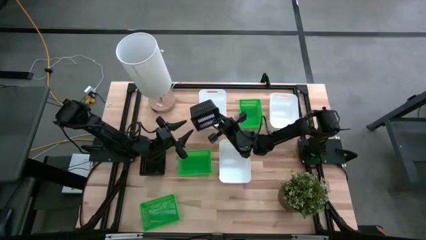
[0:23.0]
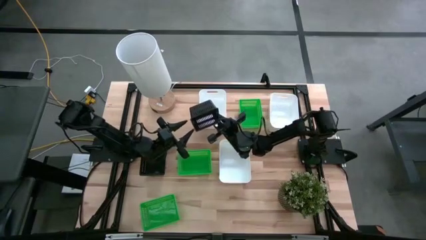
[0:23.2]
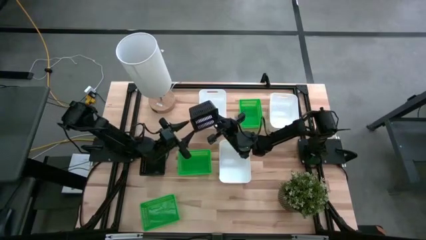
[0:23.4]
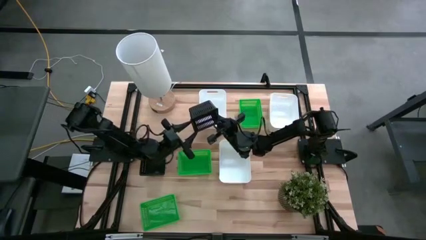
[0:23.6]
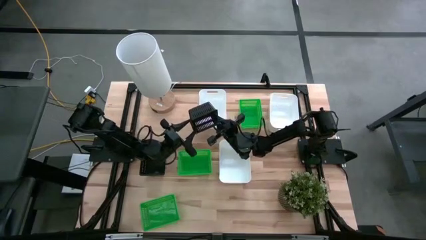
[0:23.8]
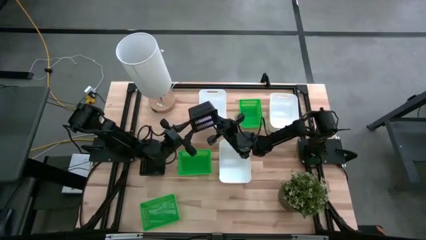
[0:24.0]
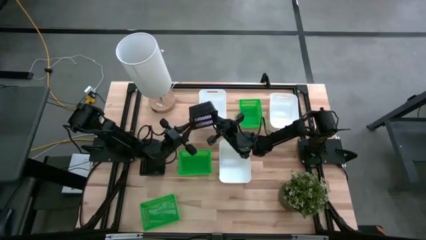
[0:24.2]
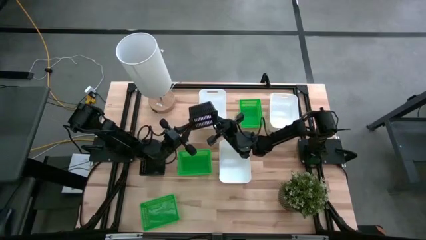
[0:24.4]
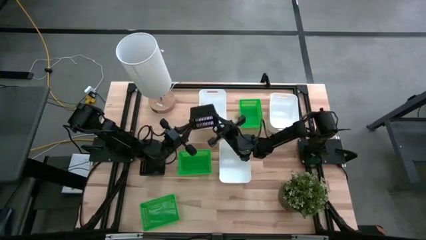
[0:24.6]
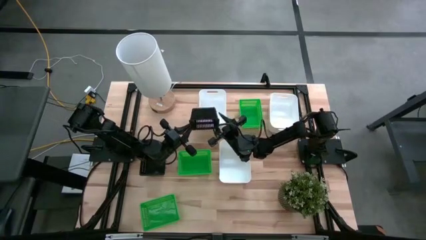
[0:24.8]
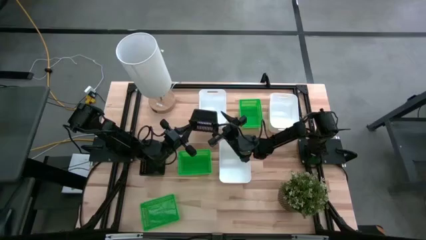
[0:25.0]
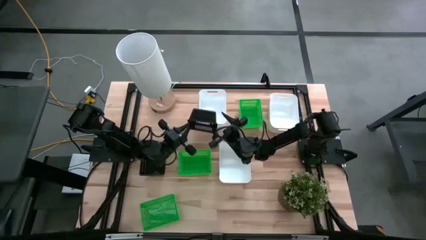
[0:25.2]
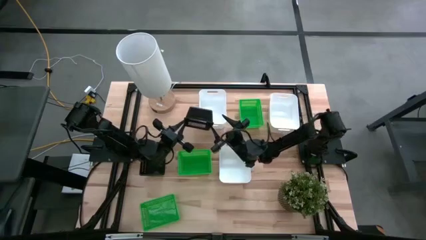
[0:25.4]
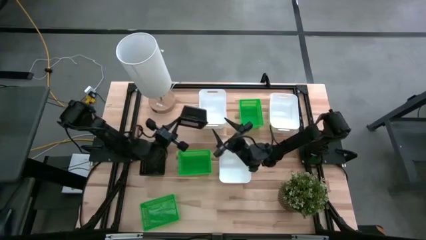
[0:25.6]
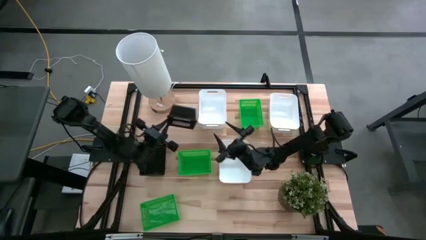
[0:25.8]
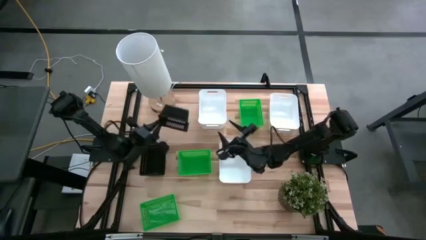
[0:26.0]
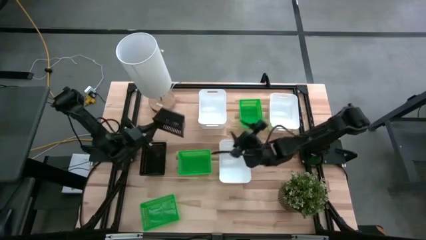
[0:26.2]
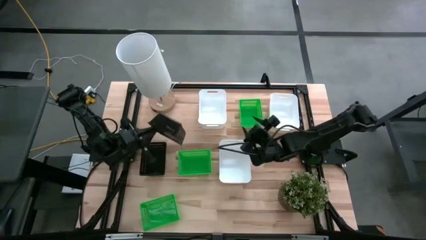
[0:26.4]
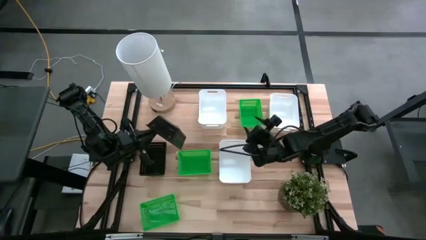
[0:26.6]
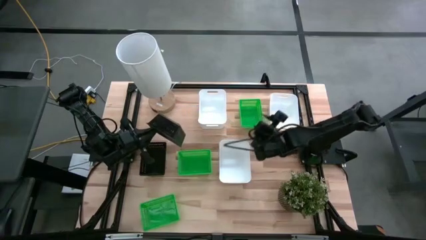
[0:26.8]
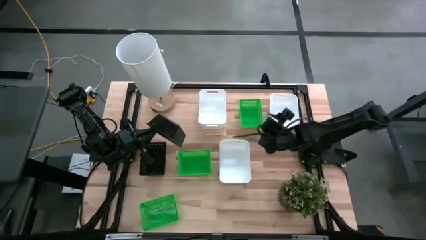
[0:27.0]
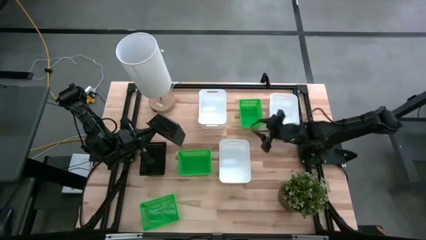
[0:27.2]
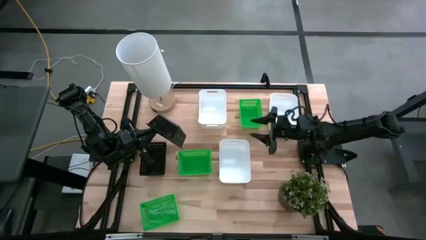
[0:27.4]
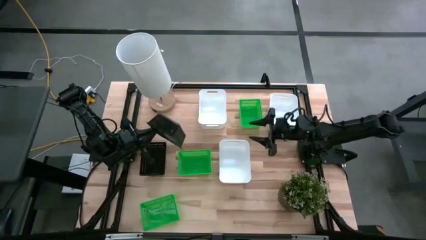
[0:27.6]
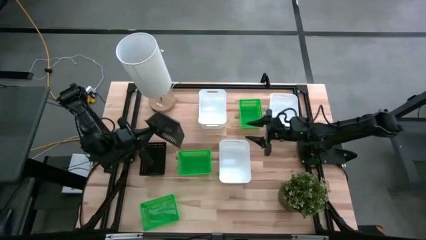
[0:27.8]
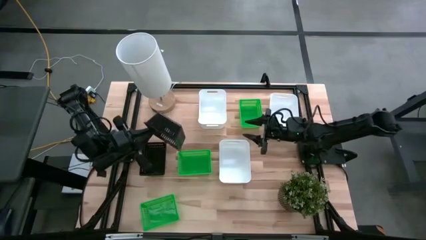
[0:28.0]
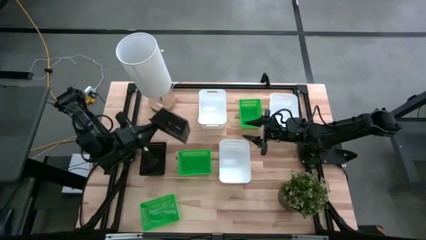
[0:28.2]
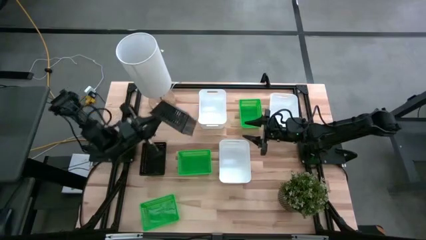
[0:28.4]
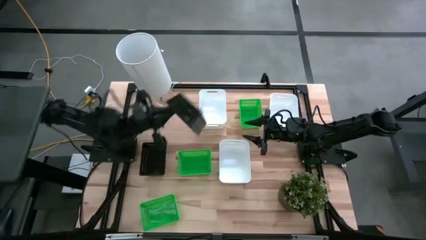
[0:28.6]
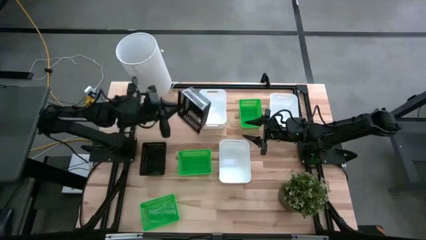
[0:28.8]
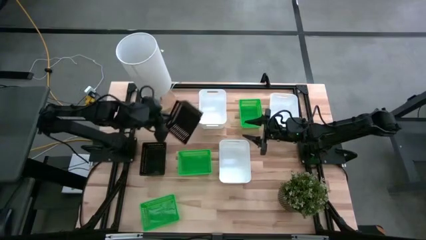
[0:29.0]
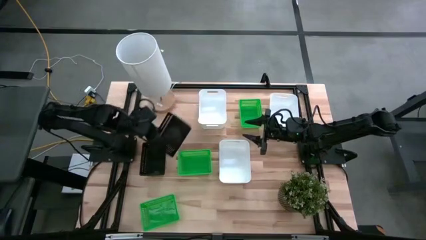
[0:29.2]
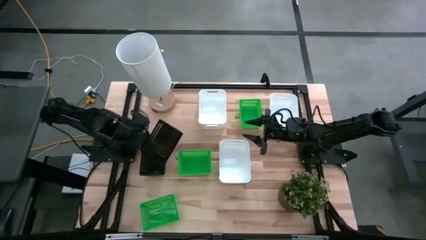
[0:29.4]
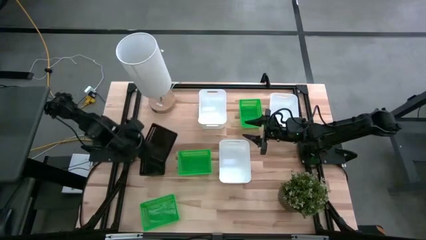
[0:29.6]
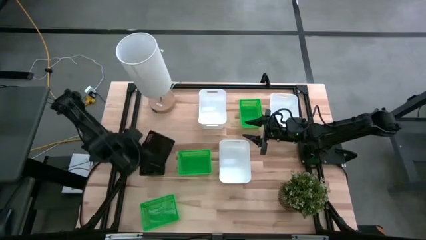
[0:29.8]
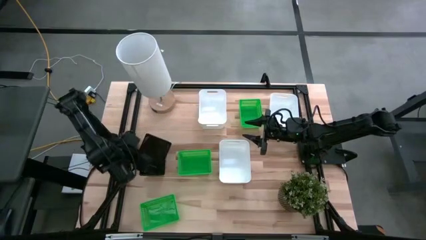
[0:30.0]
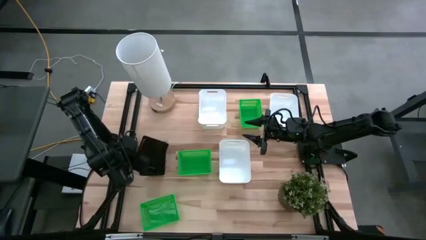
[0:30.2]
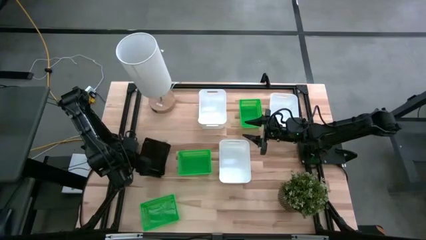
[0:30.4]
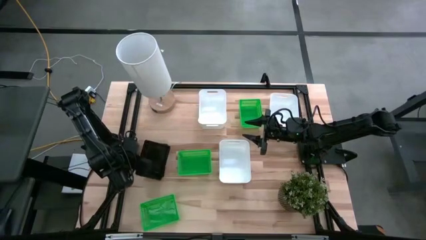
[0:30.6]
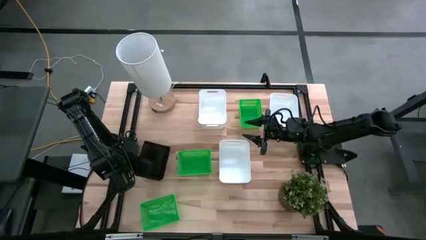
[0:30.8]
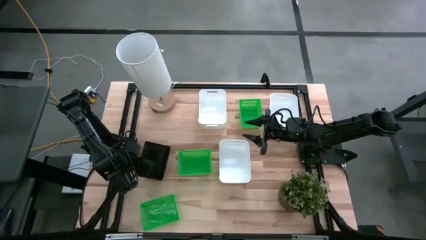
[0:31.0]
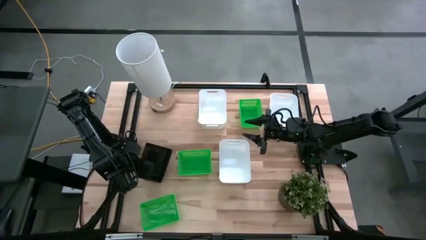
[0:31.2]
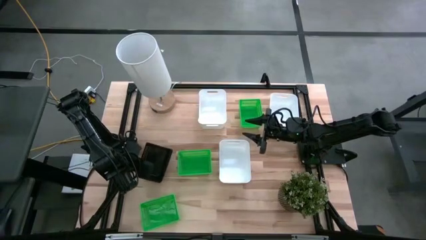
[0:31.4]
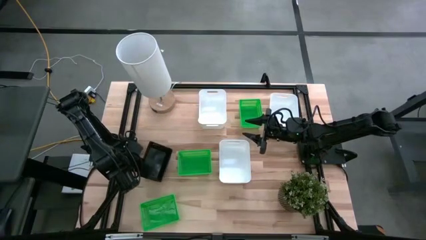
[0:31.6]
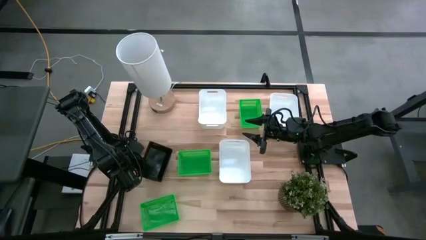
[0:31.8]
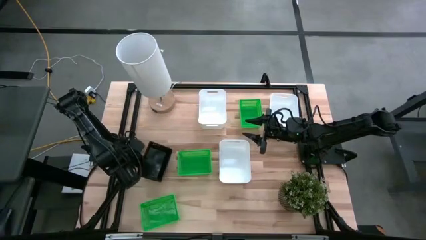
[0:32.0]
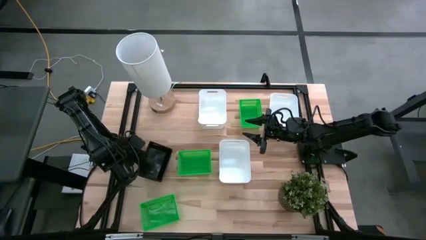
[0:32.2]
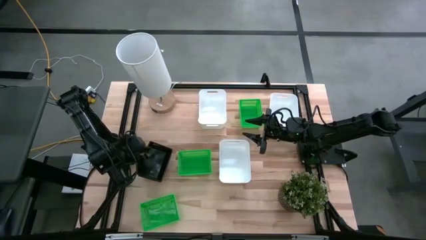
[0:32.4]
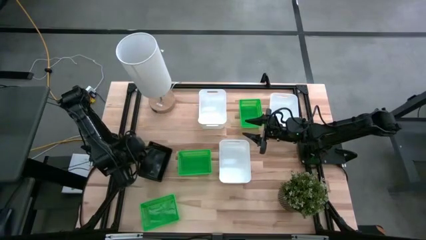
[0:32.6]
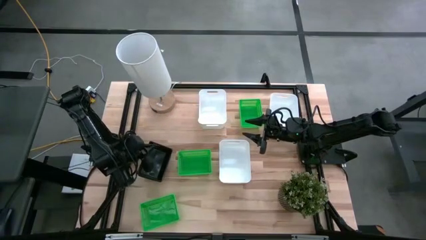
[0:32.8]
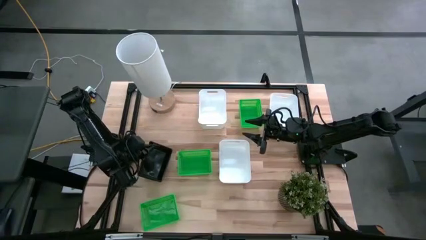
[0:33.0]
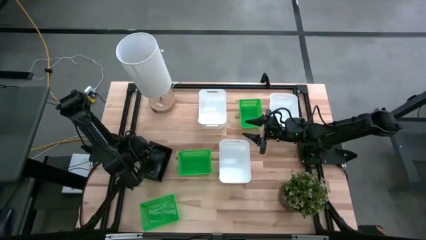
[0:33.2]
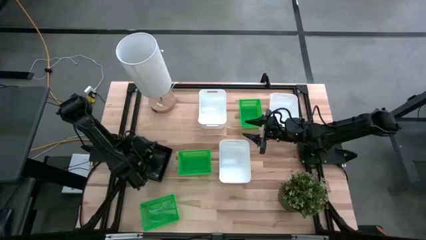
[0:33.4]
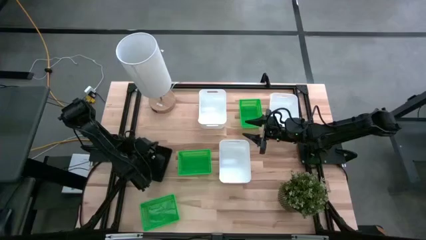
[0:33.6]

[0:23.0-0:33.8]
Stack the right black bin into the left stacked black bins

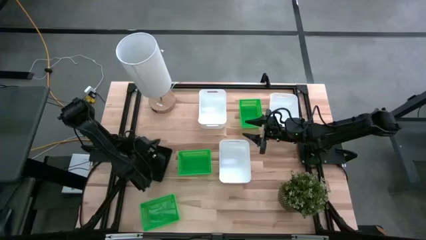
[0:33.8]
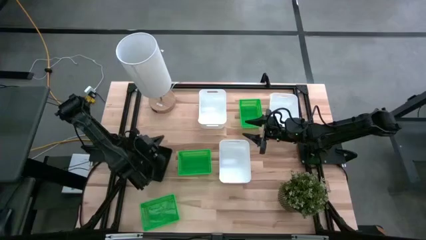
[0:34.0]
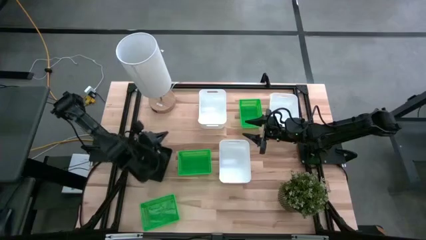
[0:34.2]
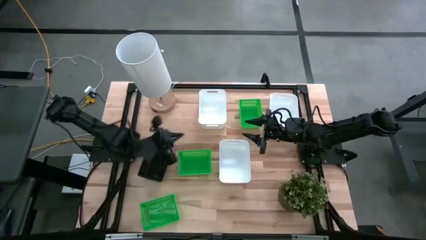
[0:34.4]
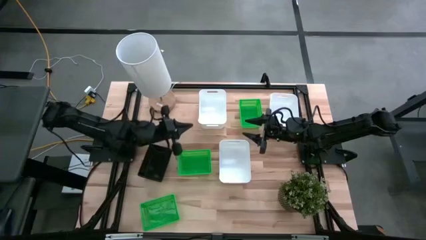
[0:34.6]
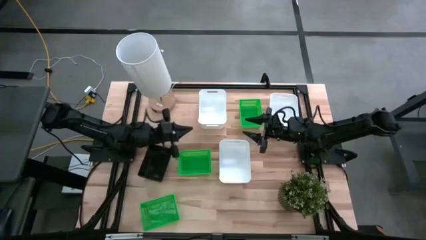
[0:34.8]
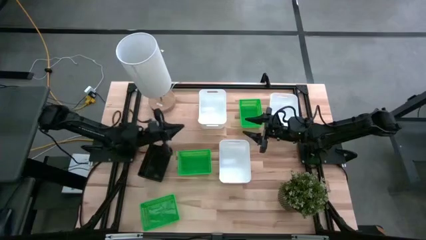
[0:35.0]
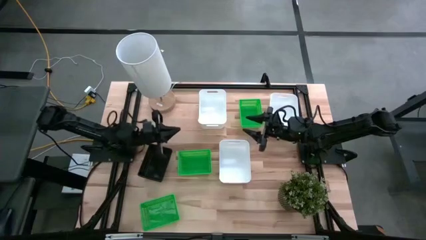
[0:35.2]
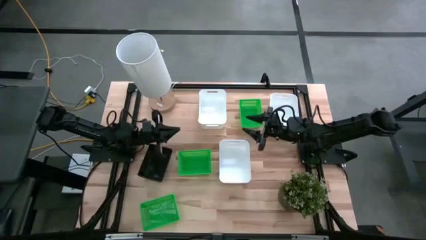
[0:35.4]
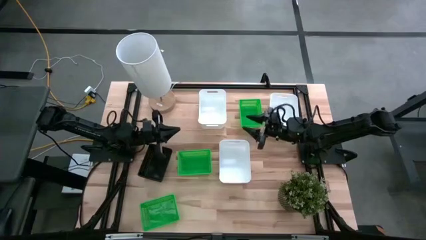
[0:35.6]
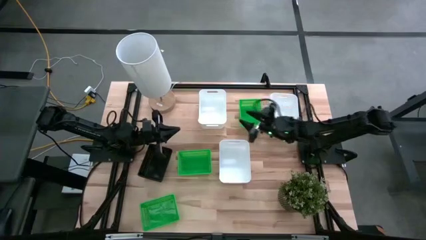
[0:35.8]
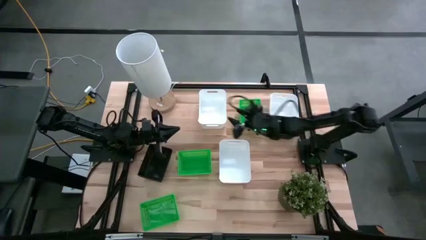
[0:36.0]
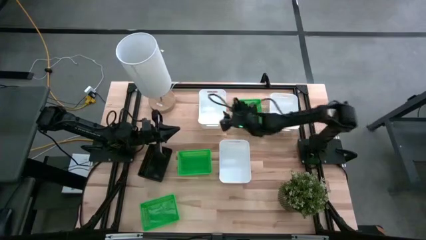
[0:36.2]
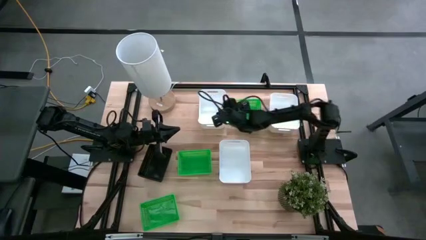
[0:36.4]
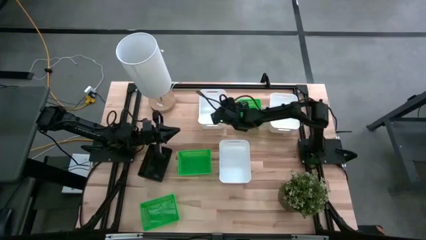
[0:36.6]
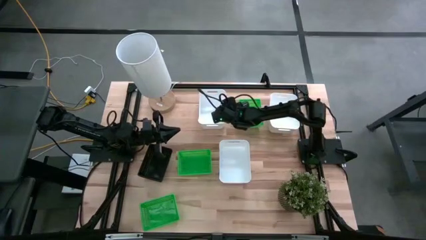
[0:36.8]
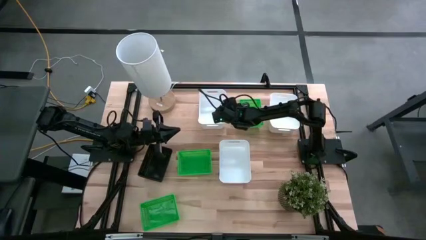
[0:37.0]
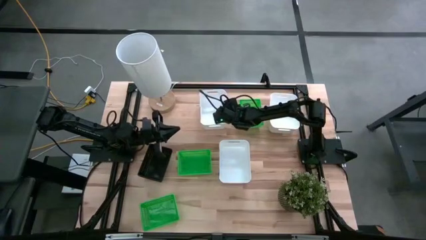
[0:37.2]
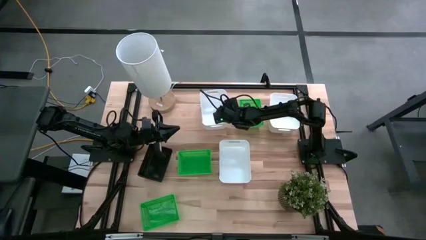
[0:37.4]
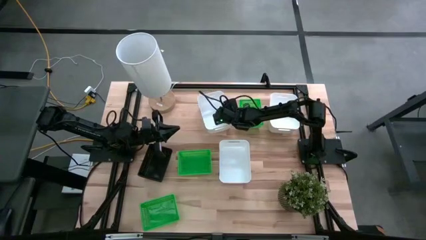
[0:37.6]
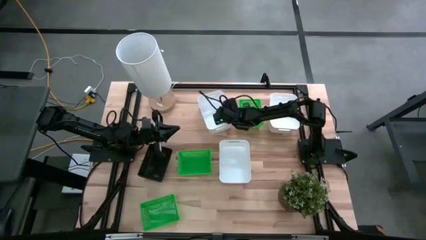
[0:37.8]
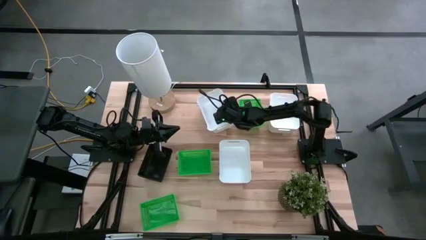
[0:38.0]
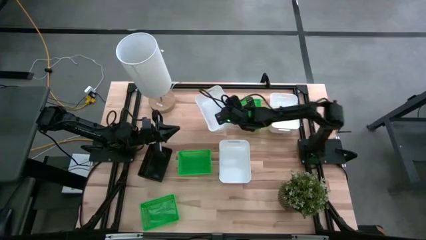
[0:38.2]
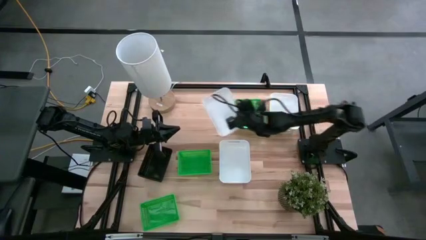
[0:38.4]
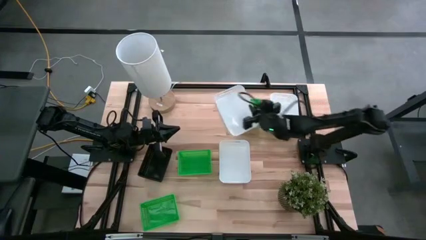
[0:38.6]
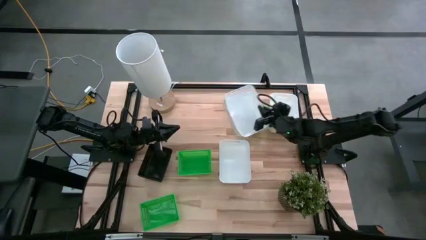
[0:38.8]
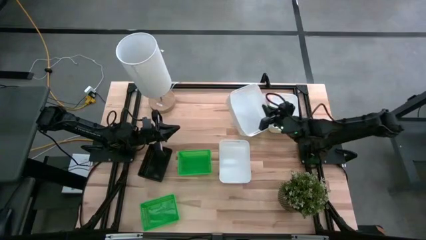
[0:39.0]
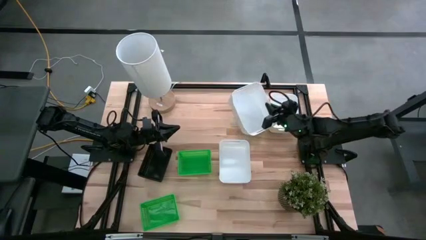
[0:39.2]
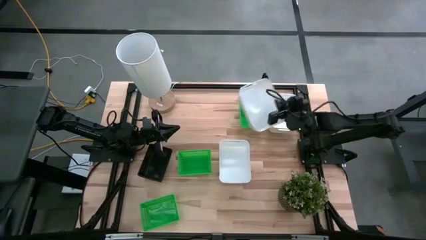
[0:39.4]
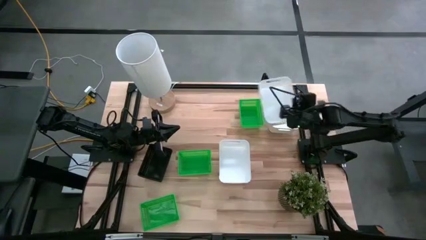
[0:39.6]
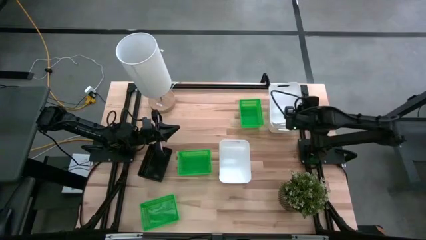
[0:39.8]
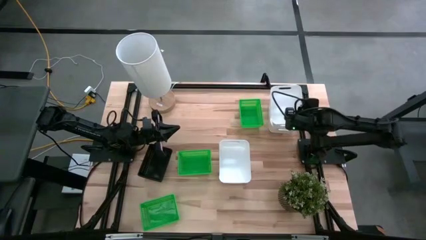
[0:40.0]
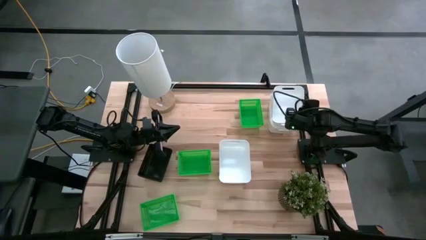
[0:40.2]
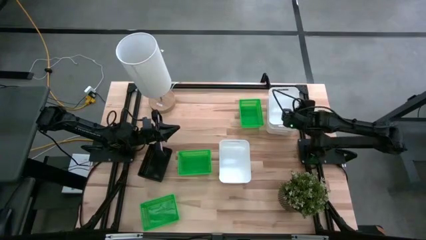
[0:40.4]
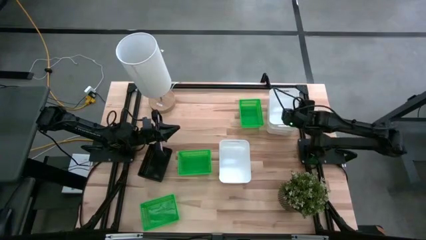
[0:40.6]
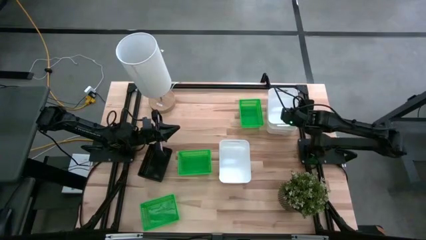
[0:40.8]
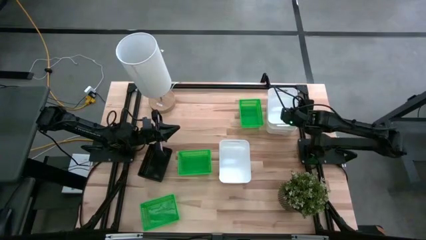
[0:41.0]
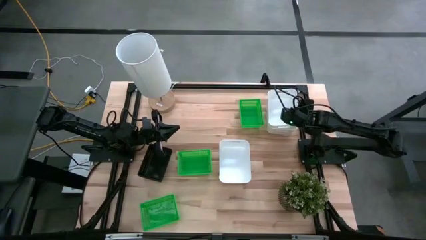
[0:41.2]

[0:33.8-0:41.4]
Stack the top left white bin into the top right white bin
